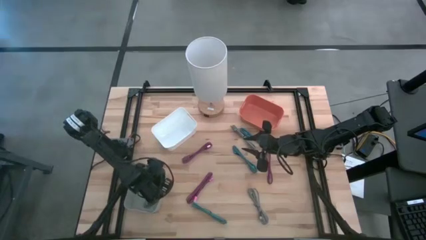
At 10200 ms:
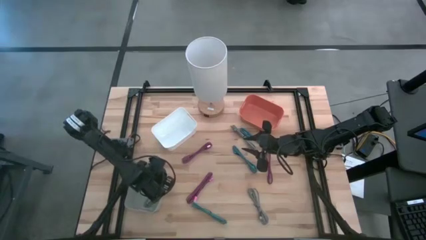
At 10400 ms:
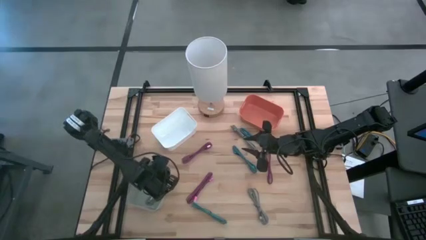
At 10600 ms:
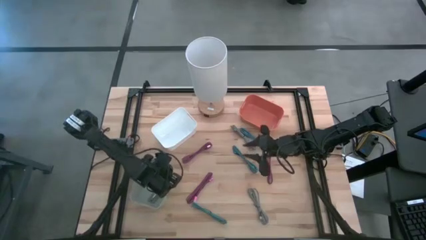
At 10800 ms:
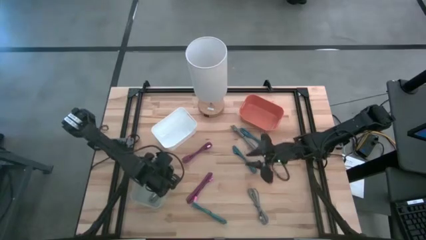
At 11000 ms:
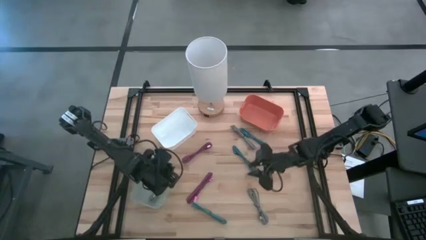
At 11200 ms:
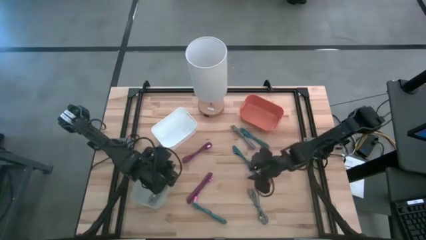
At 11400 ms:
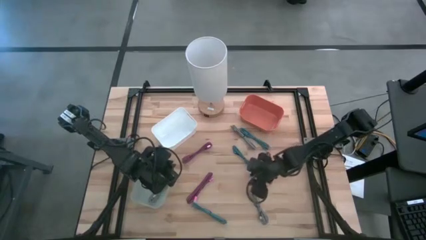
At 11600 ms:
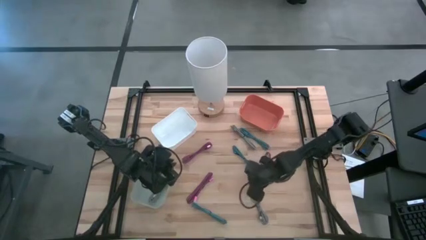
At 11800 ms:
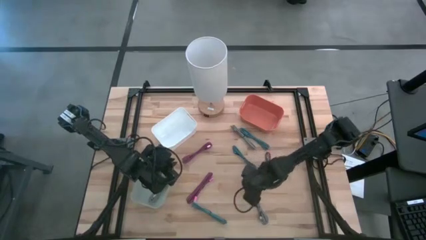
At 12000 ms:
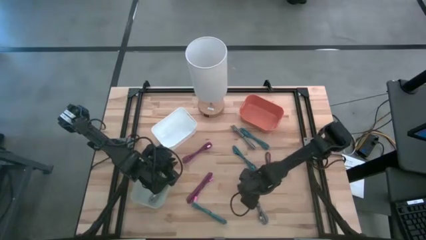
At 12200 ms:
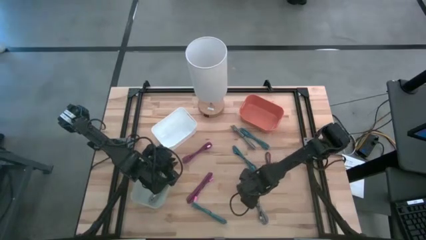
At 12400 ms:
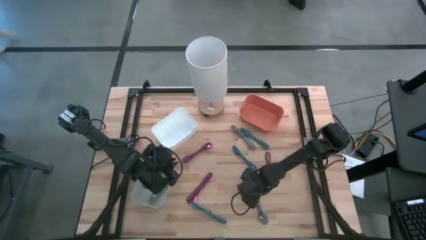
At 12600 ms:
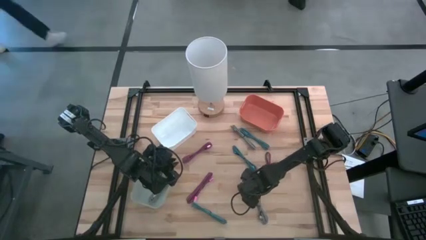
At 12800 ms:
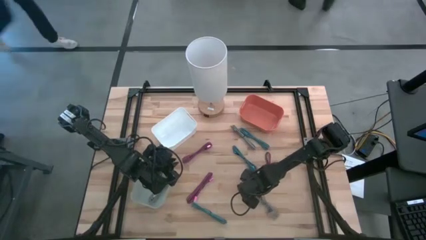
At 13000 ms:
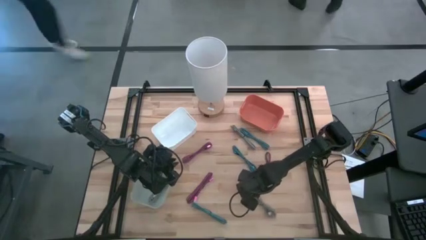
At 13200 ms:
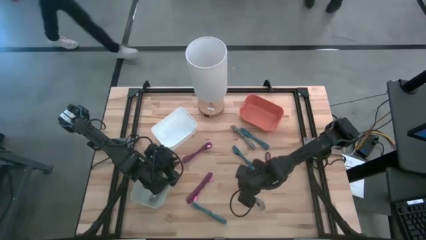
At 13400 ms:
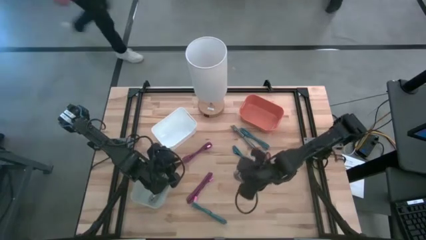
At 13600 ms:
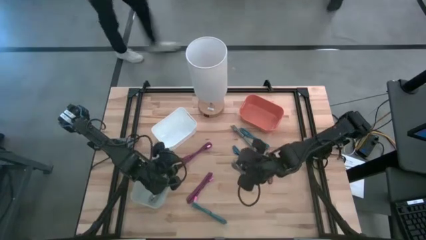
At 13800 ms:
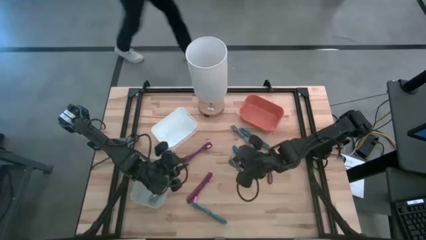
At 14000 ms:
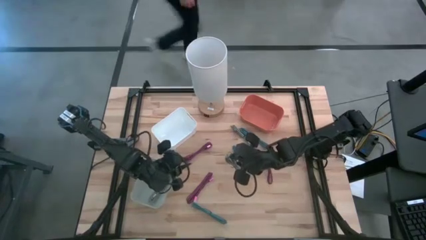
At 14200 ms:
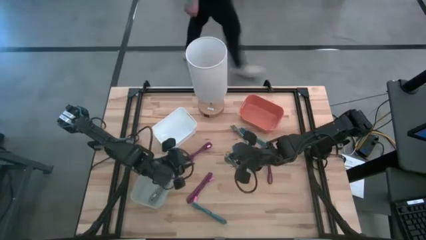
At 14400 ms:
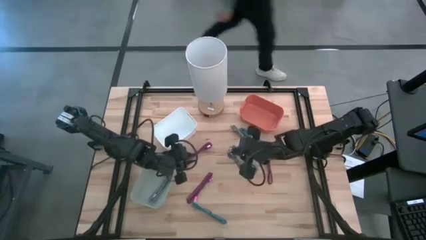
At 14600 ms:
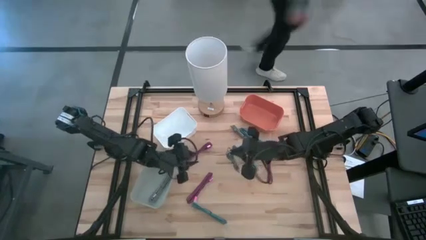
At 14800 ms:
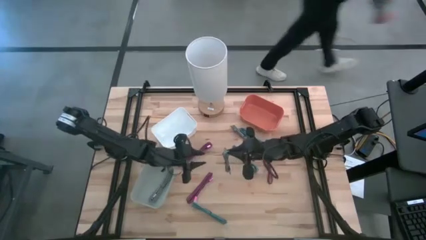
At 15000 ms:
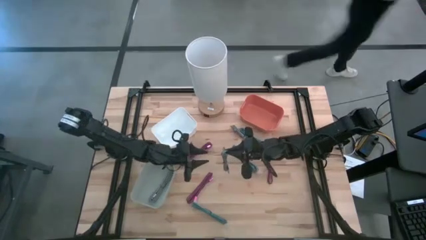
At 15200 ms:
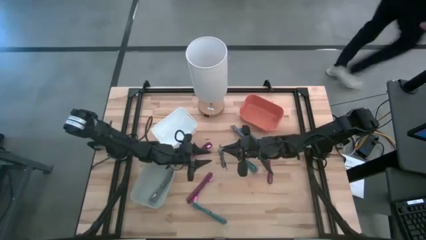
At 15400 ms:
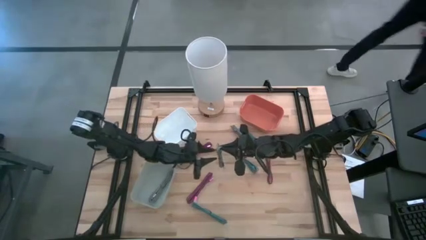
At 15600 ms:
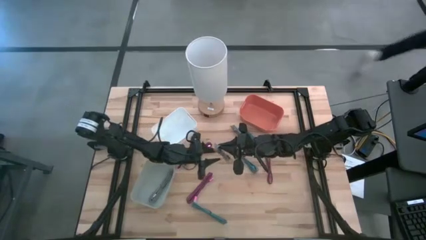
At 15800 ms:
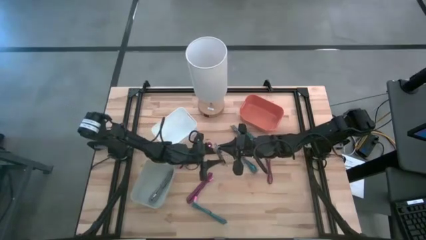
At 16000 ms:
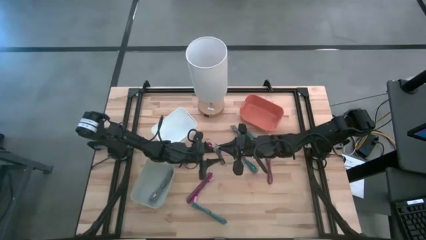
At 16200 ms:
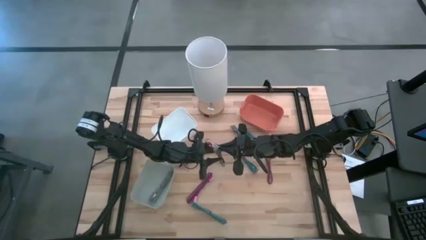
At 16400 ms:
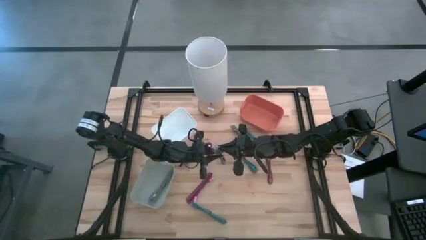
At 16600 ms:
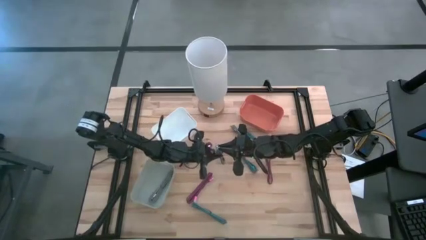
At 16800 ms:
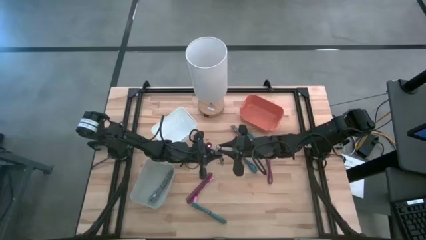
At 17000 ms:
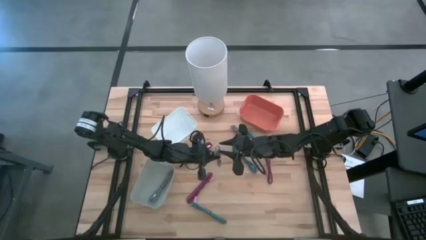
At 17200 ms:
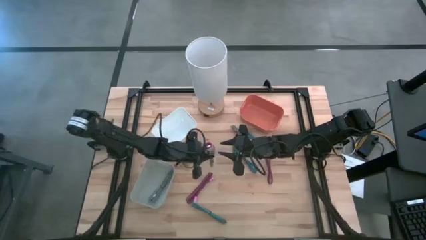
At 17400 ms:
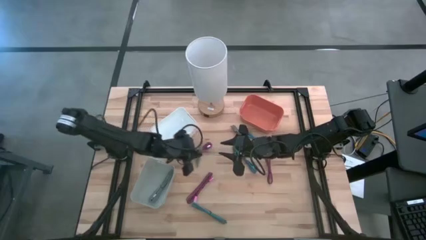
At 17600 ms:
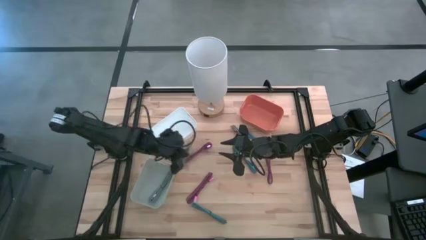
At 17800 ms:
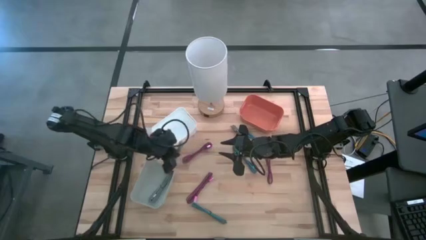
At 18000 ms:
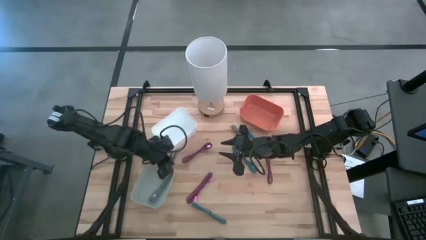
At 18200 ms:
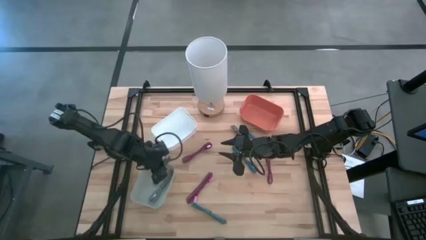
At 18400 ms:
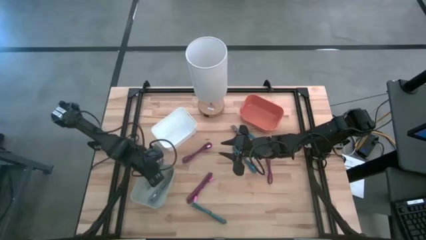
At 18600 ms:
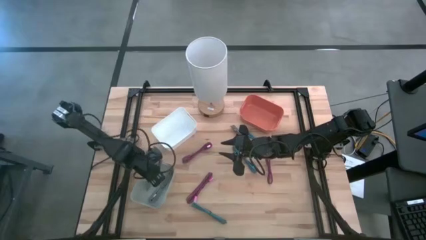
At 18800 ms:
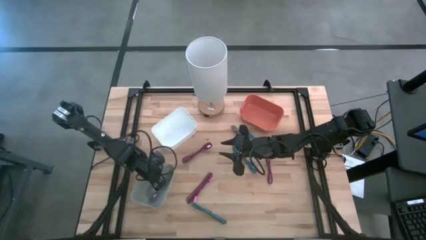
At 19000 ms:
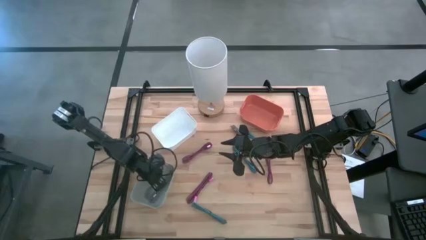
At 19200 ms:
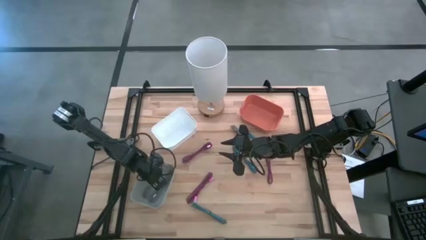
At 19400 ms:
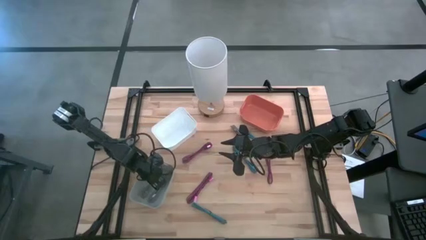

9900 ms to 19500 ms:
Task: Pick & Place USB Port
Put the bottom white and black charger cable into the gray bin

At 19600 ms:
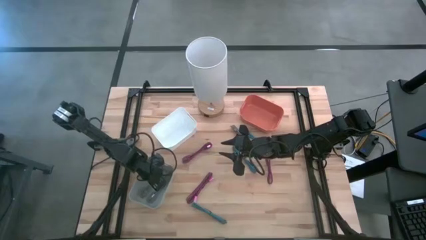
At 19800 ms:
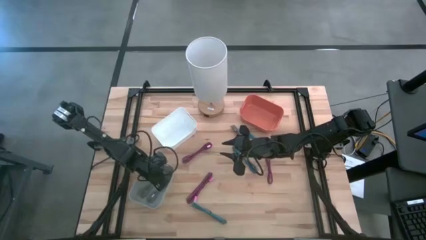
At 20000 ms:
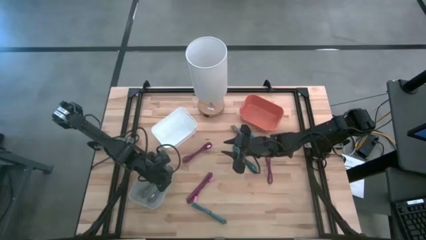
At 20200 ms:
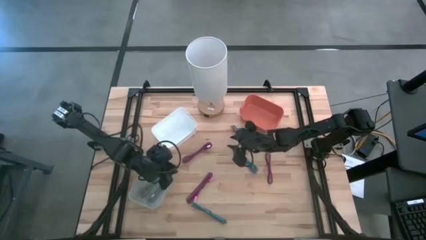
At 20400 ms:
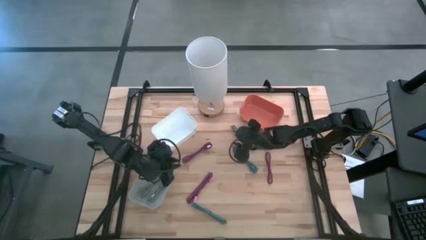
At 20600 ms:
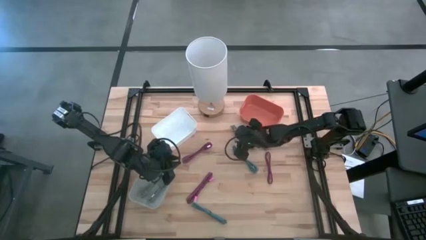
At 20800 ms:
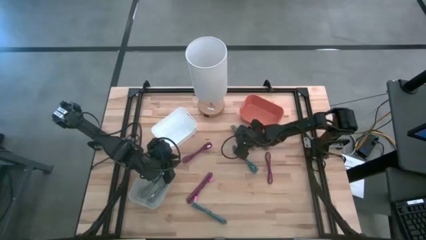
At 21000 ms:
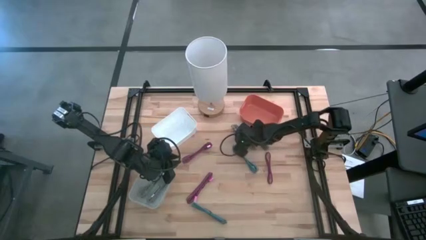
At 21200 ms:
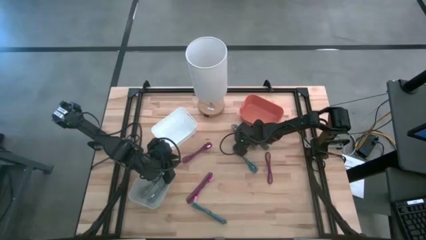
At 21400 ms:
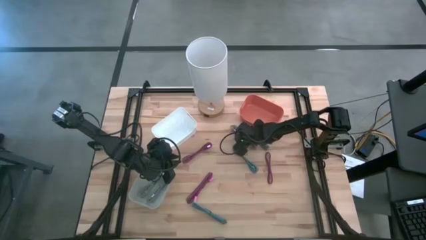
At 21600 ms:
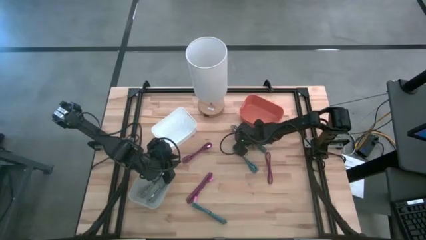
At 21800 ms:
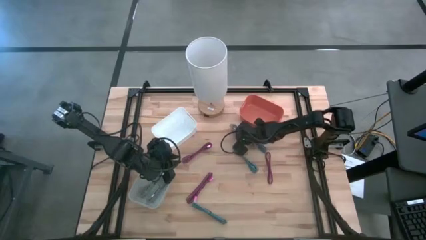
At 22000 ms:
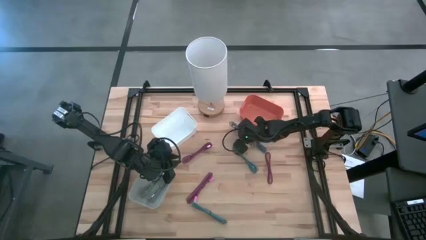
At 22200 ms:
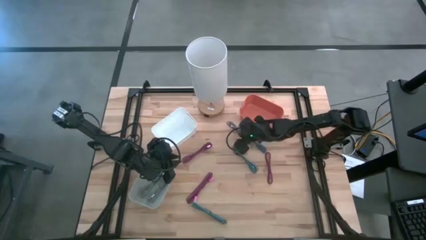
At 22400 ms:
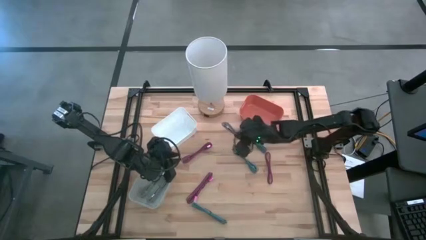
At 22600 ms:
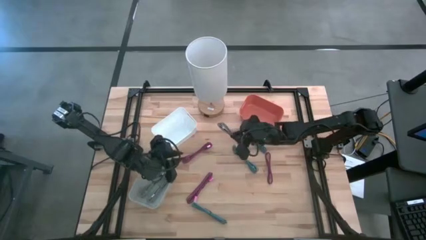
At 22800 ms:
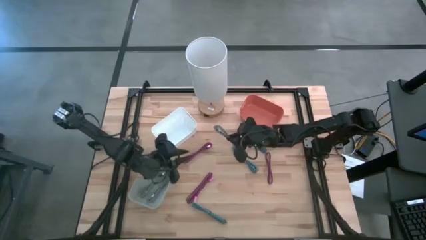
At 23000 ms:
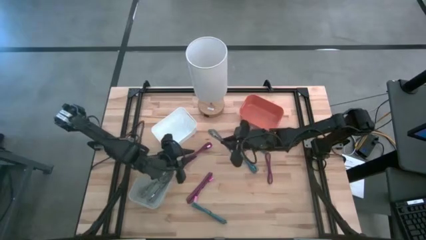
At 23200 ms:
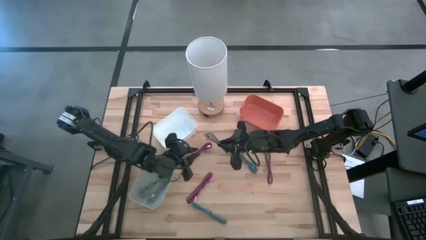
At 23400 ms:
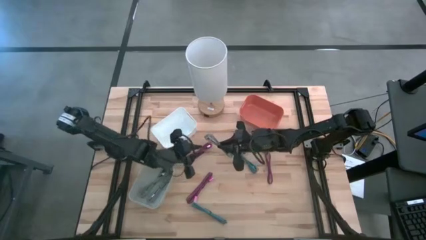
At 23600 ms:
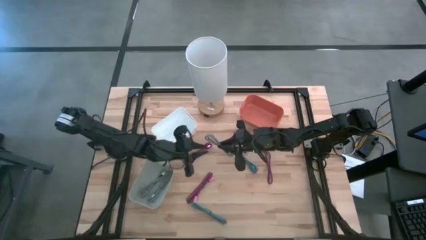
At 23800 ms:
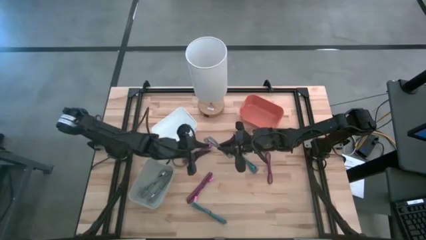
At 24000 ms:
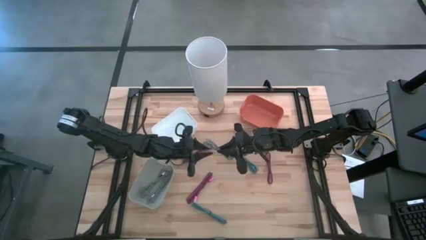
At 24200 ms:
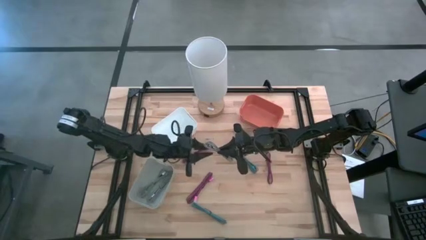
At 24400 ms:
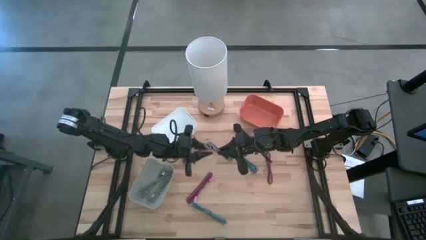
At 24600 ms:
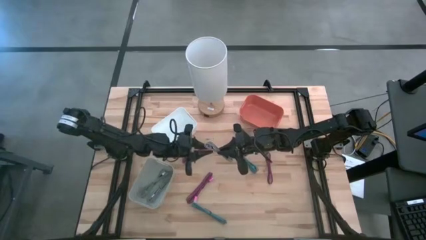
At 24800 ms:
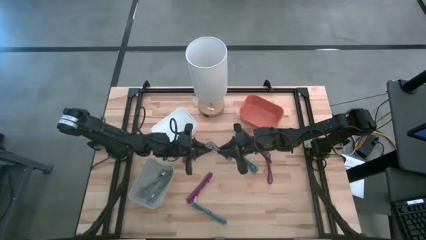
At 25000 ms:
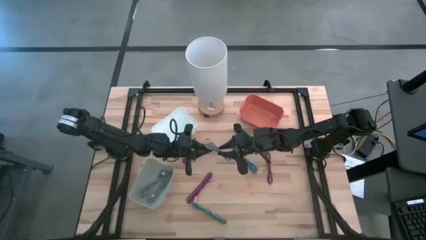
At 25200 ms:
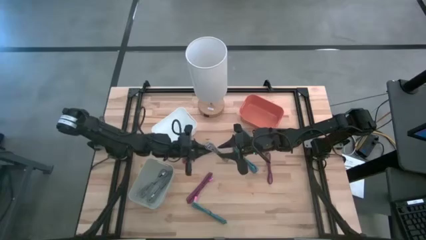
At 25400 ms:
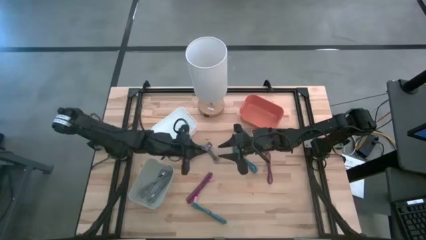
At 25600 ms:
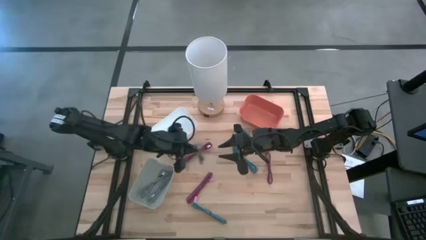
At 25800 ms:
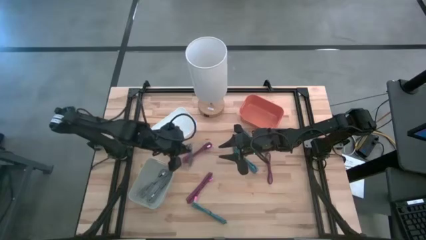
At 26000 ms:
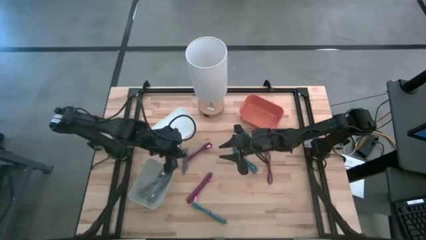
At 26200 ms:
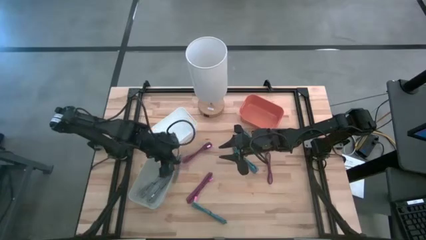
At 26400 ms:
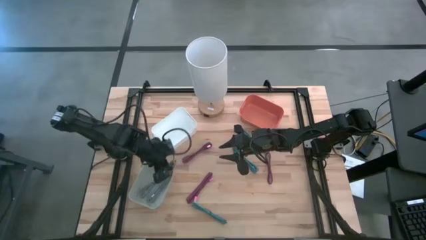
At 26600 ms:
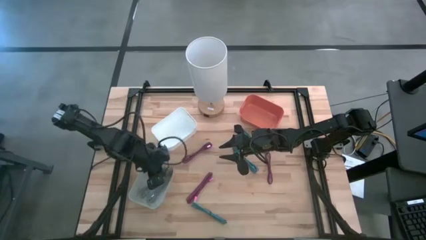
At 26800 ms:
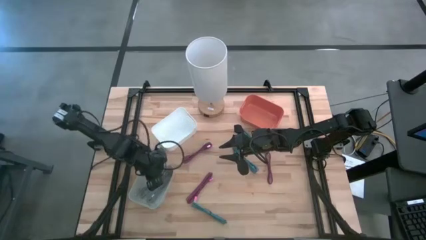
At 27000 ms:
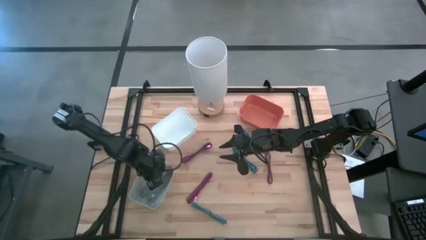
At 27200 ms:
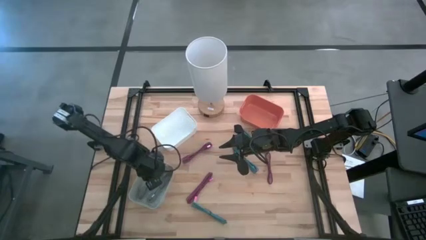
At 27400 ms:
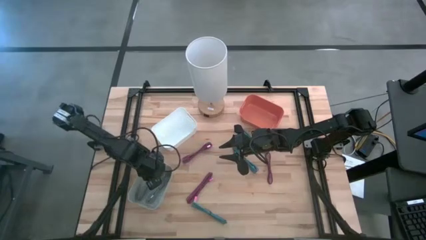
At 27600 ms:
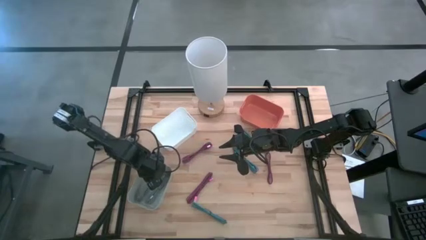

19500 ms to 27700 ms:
Put the white and black charger cable into the gray bin
